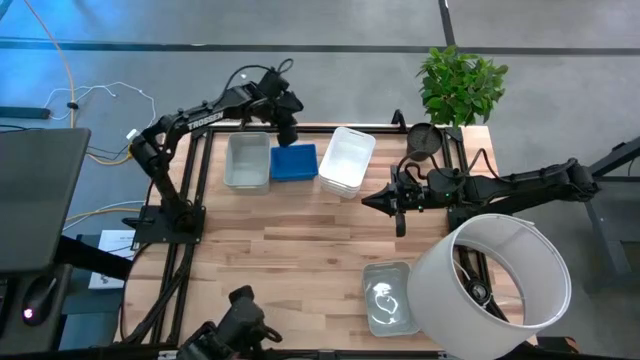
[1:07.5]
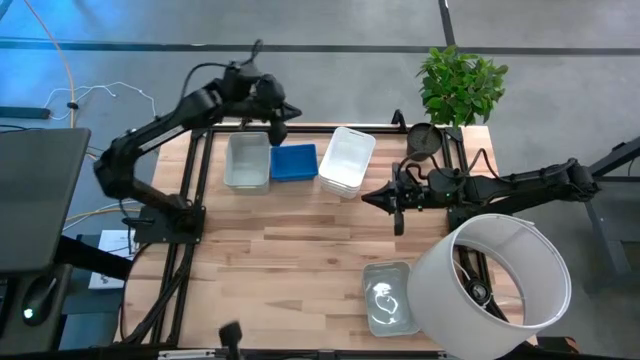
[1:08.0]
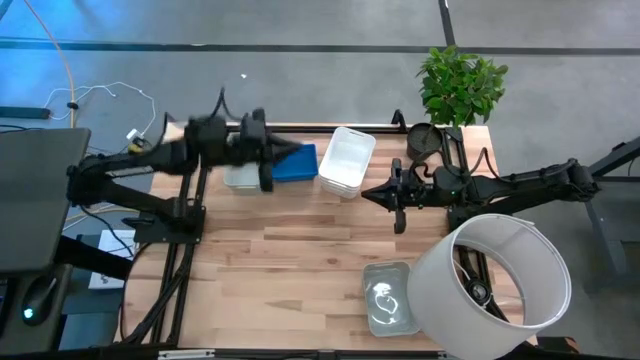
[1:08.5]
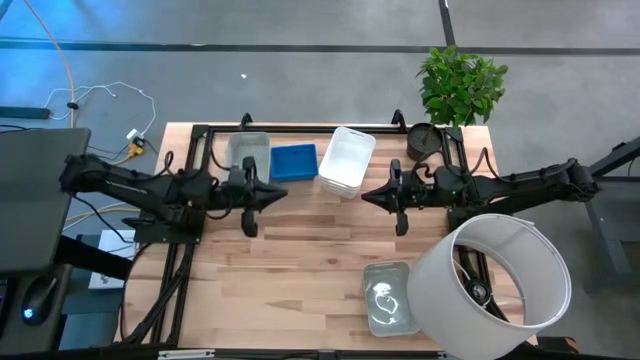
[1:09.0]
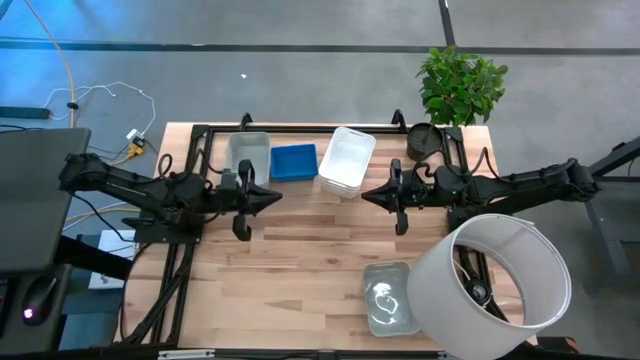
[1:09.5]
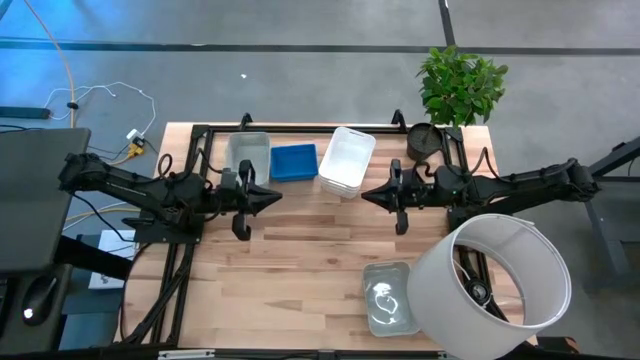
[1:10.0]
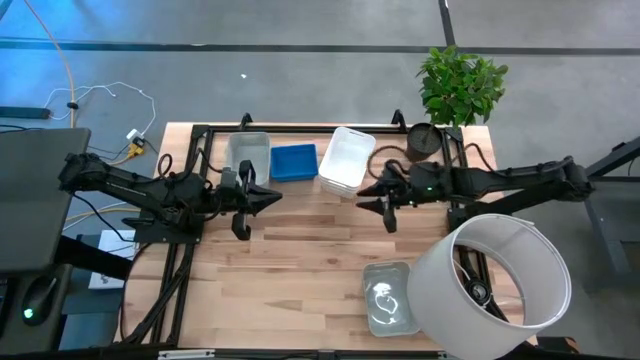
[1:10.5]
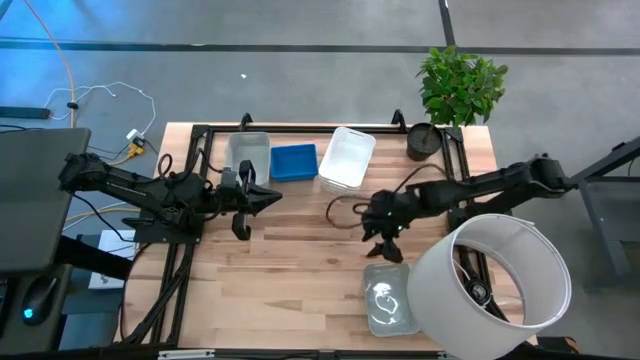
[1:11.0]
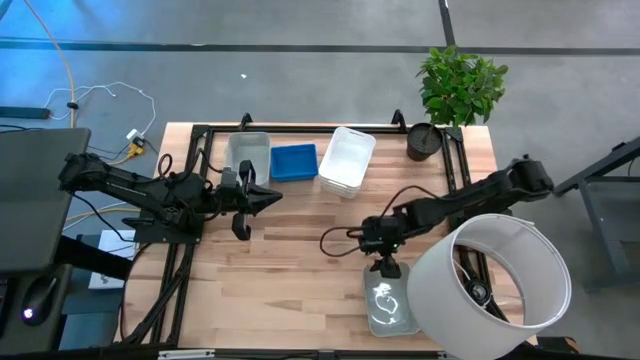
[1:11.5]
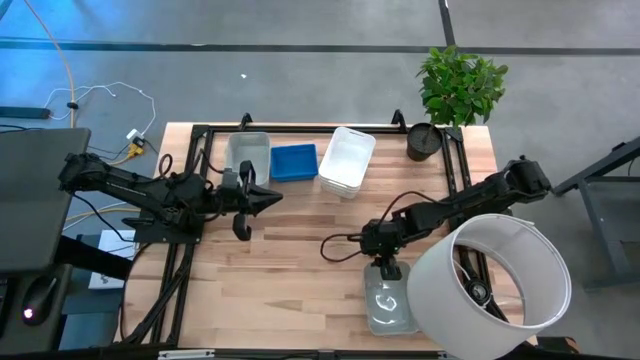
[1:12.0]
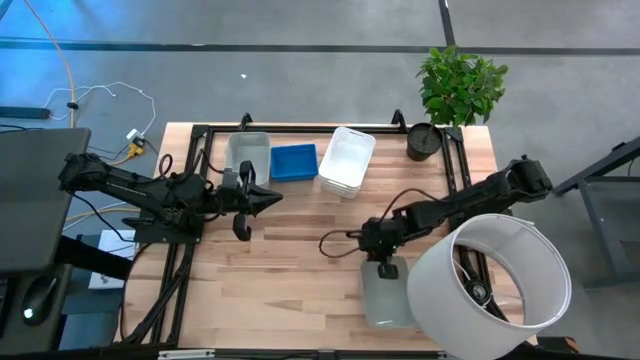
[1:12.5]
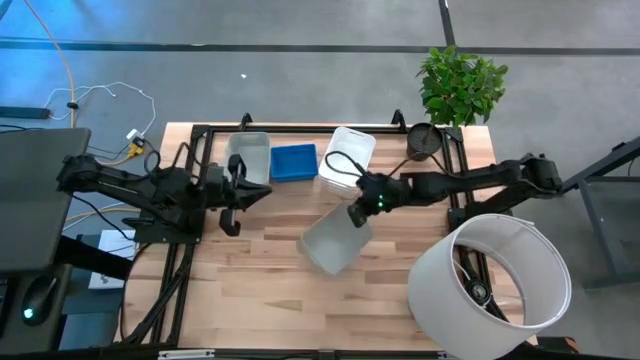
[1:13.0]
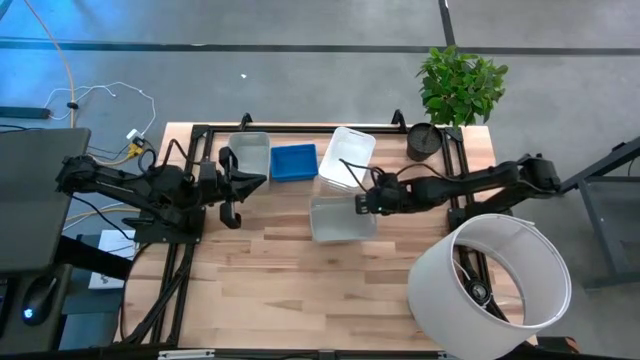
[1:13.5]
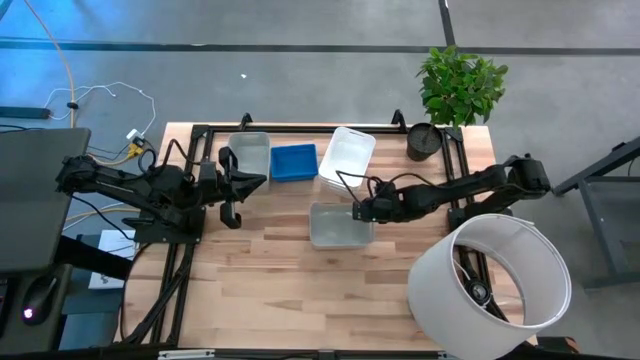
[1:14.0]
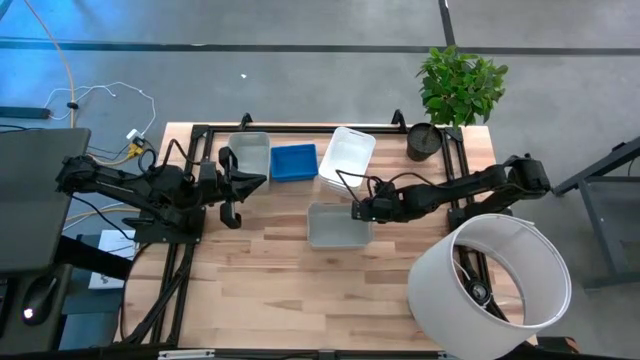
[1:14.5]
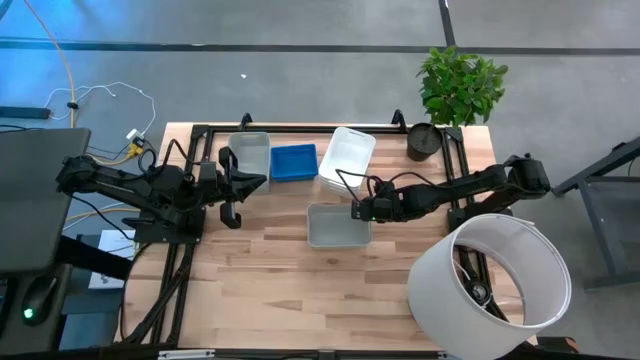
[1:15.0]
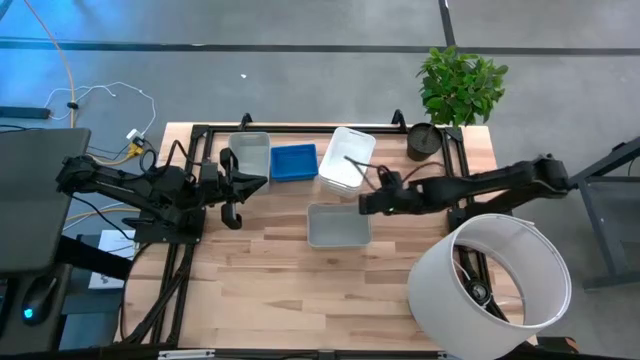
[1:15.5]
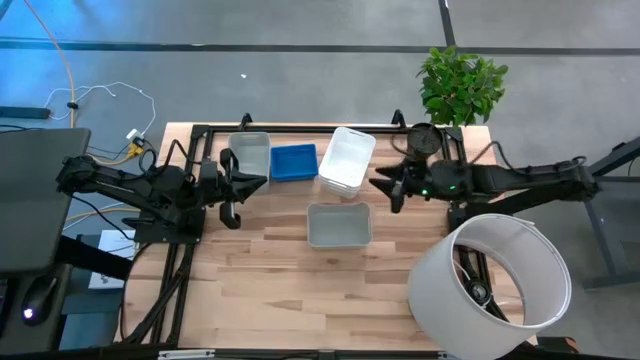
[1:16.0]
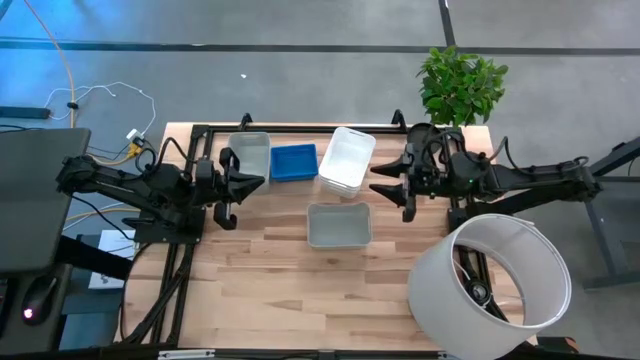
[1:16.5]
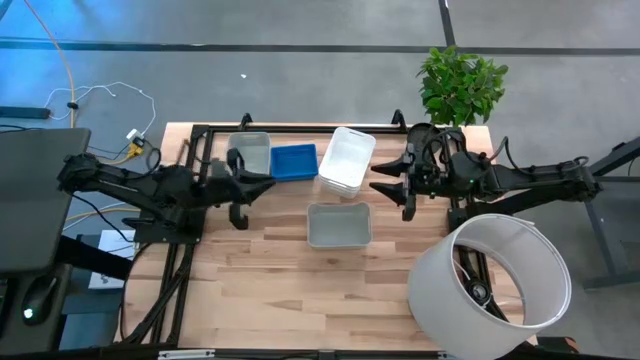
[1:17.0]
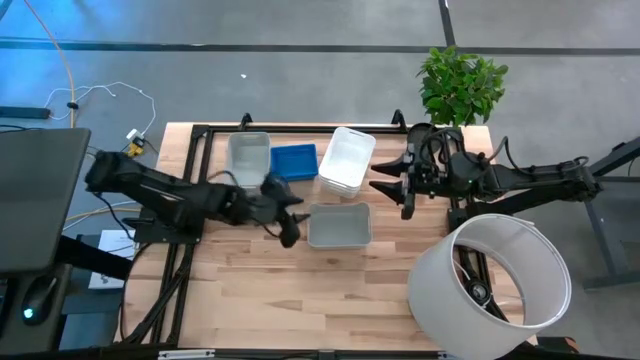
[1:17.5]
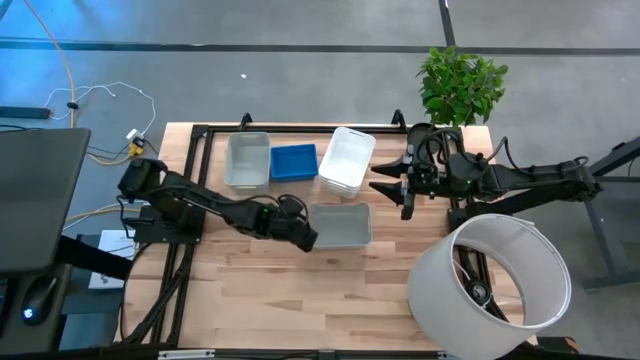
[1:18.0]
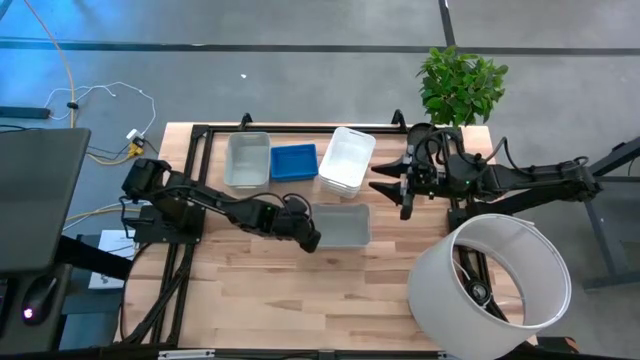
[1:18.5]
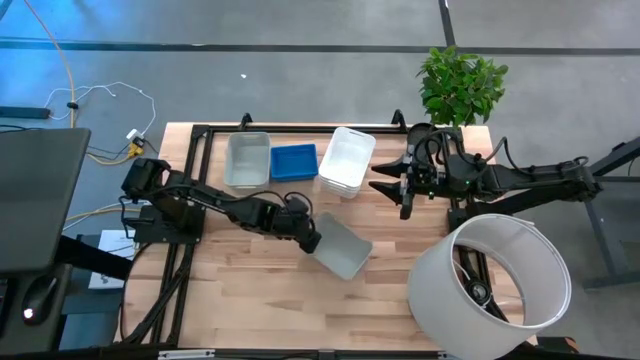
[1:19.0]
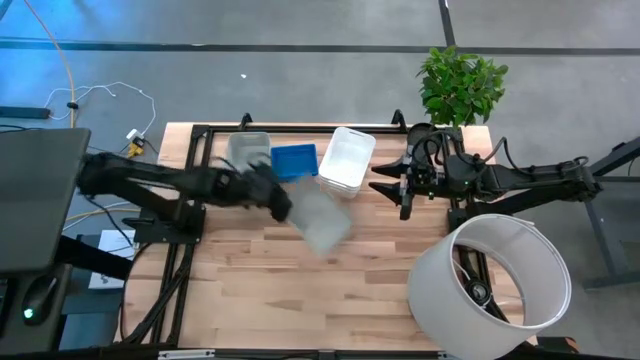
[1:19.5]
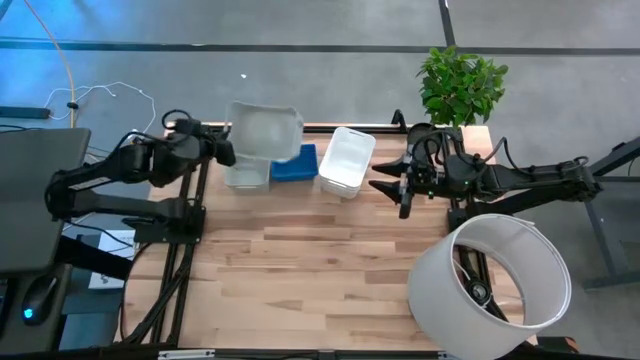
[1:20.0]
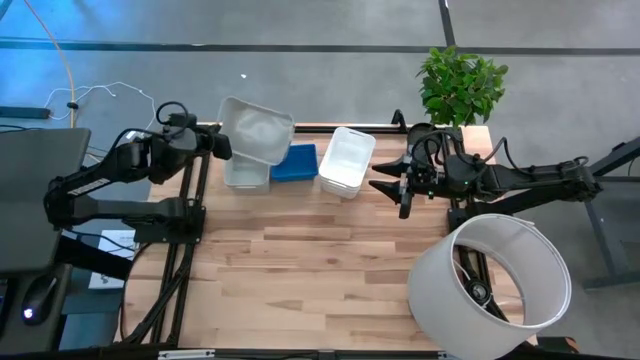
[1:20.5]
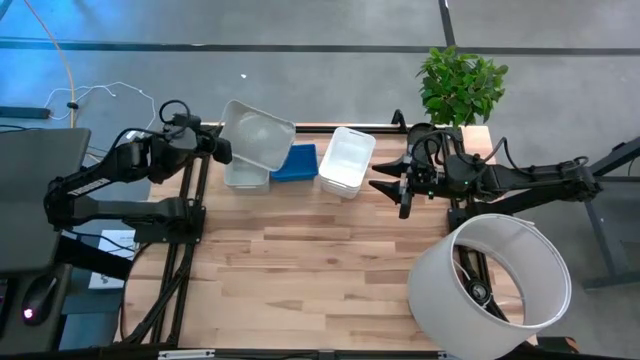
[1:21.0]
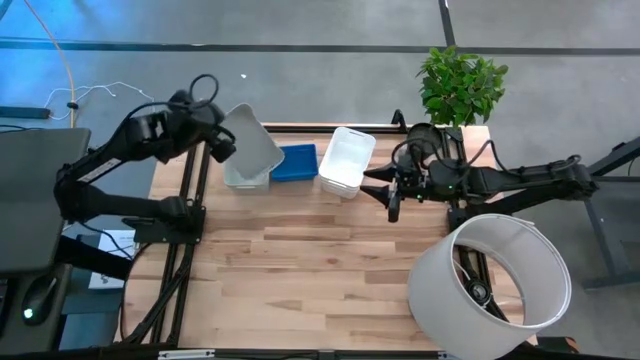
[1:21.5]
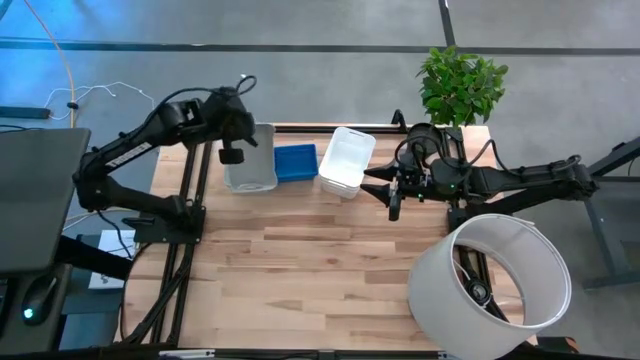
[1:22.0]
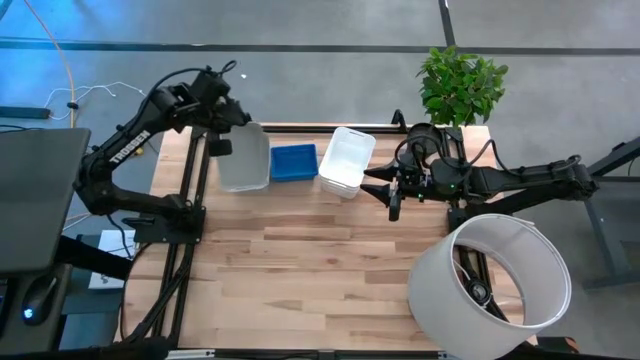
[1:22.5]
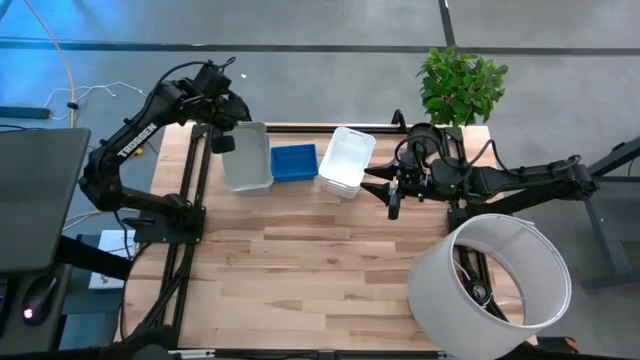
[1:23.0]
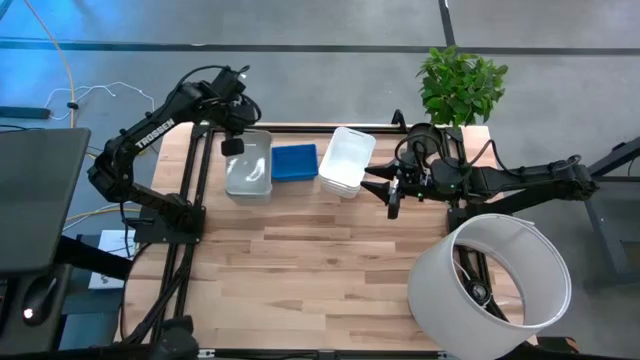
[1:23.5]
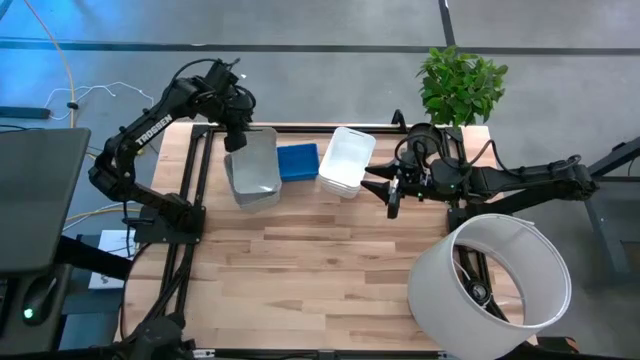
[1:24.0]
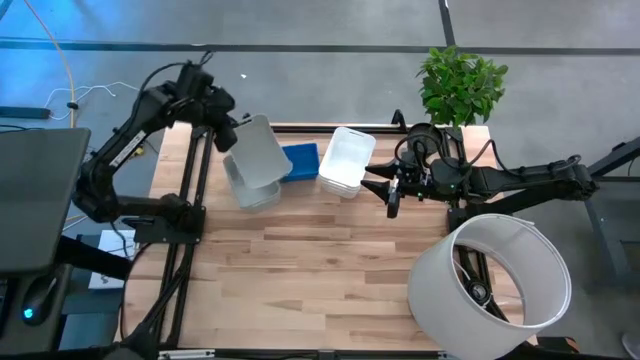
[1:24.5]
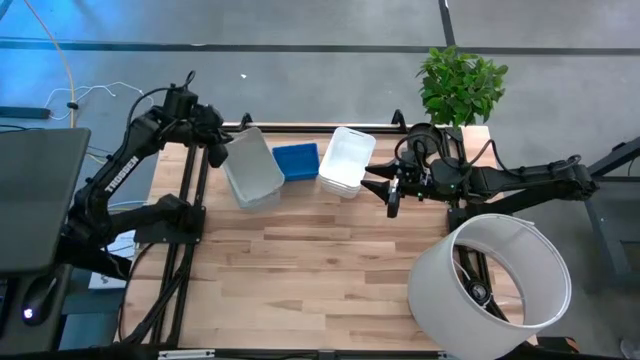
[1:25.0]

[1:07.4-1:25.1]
Stack the bottom gray bin on the top gray bin
